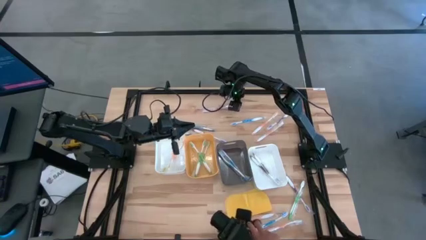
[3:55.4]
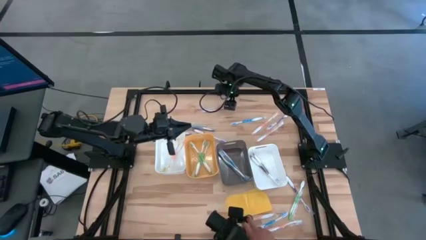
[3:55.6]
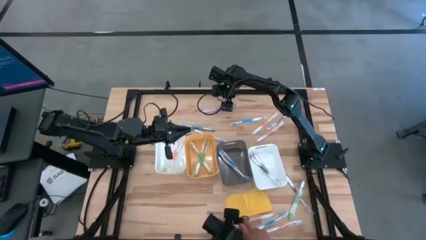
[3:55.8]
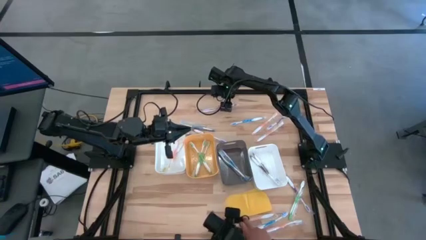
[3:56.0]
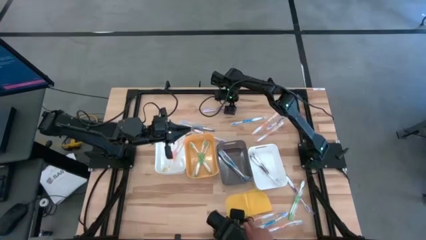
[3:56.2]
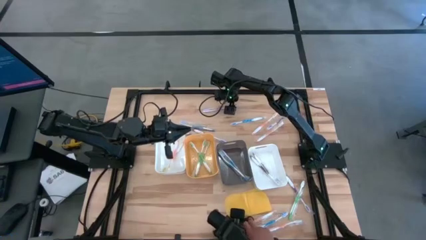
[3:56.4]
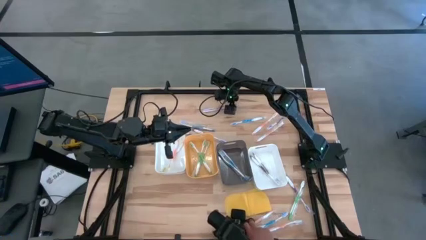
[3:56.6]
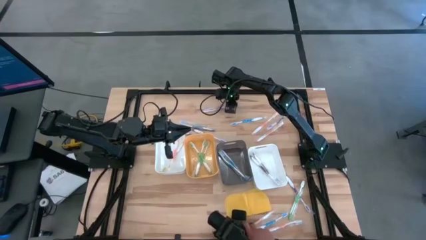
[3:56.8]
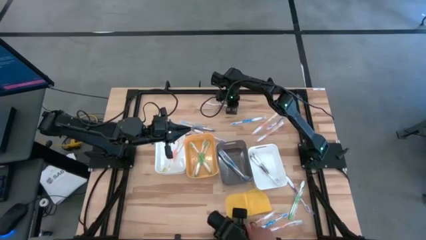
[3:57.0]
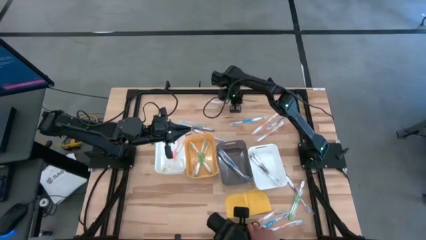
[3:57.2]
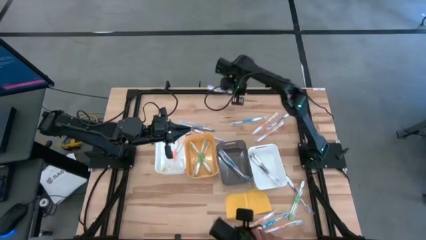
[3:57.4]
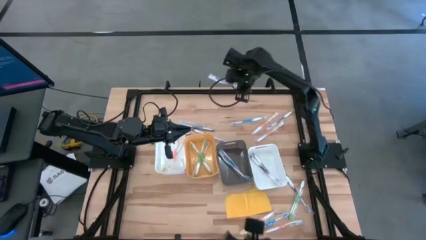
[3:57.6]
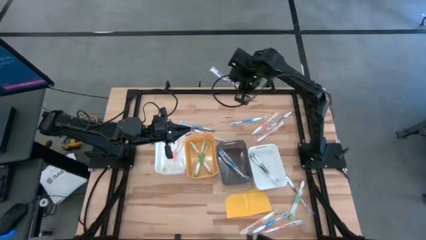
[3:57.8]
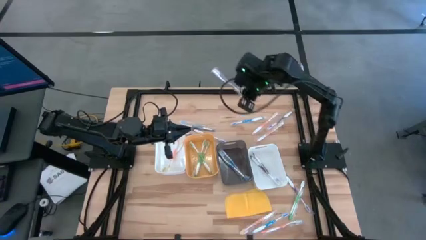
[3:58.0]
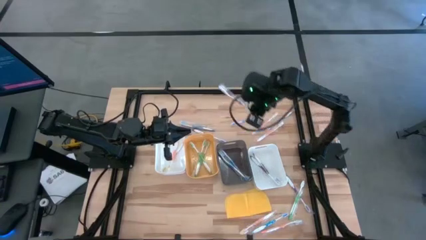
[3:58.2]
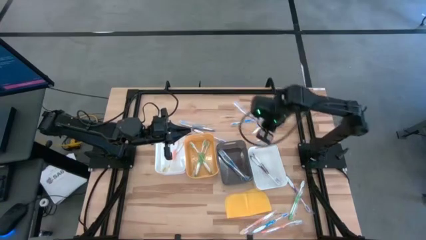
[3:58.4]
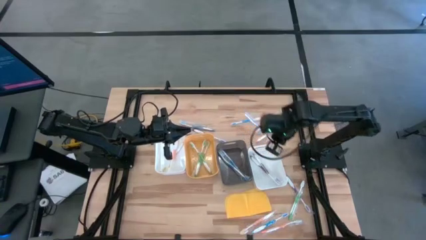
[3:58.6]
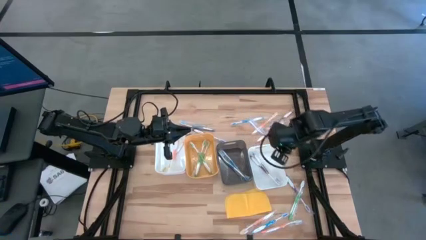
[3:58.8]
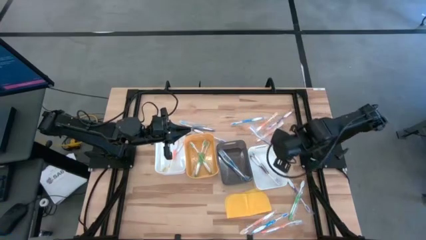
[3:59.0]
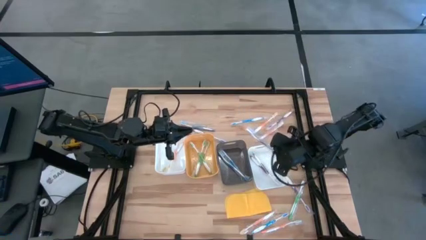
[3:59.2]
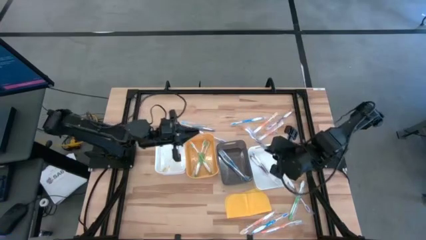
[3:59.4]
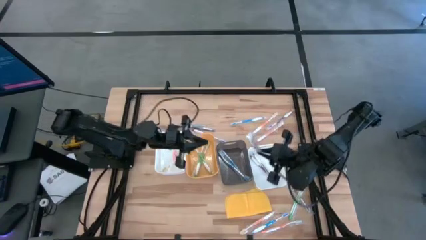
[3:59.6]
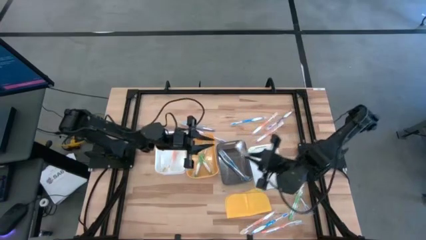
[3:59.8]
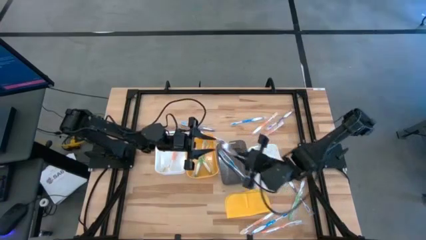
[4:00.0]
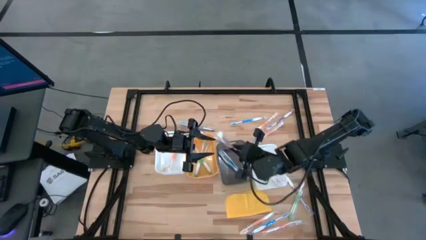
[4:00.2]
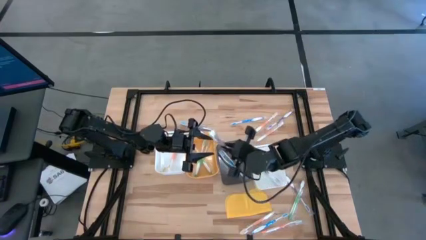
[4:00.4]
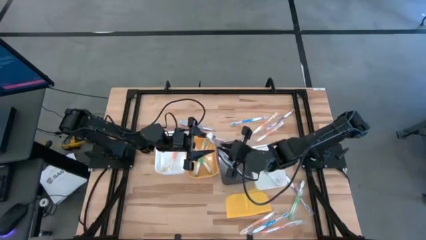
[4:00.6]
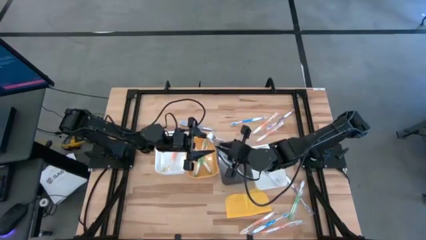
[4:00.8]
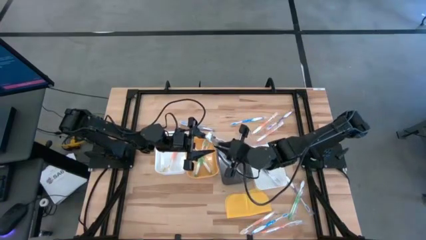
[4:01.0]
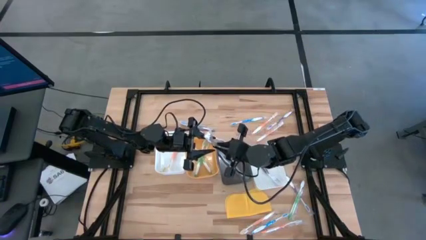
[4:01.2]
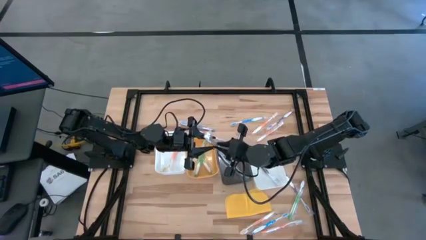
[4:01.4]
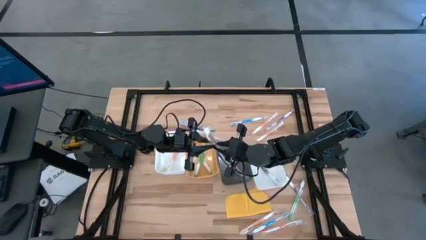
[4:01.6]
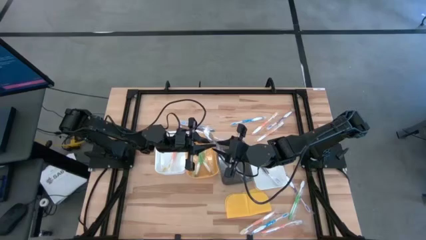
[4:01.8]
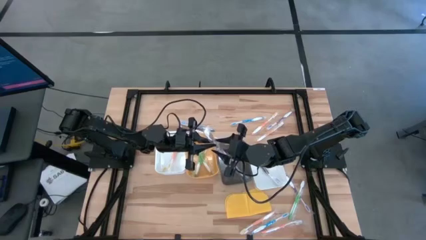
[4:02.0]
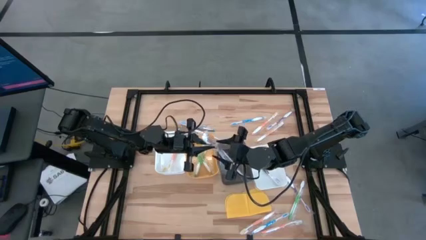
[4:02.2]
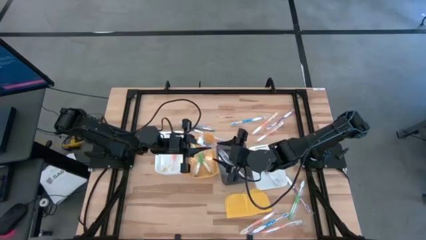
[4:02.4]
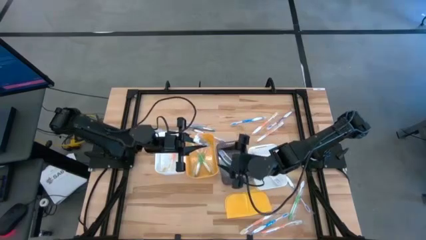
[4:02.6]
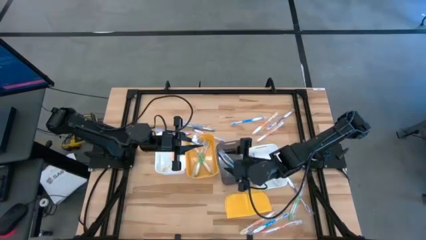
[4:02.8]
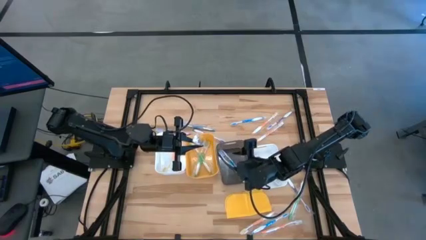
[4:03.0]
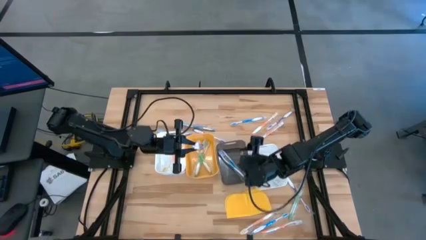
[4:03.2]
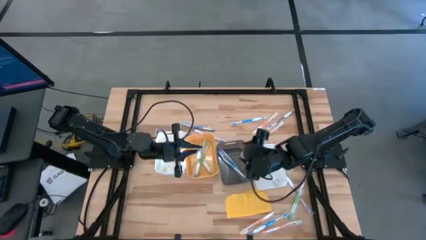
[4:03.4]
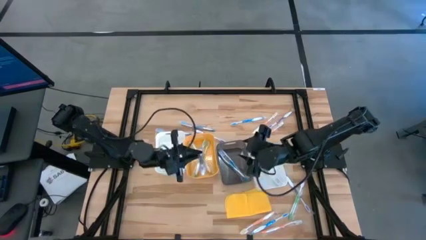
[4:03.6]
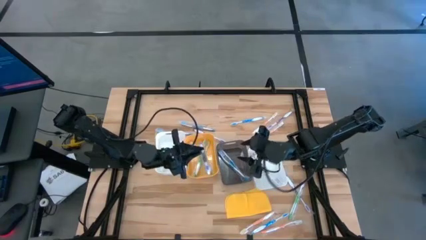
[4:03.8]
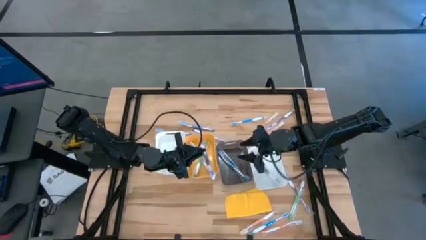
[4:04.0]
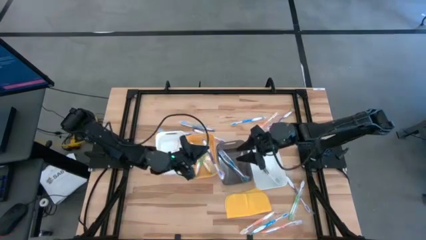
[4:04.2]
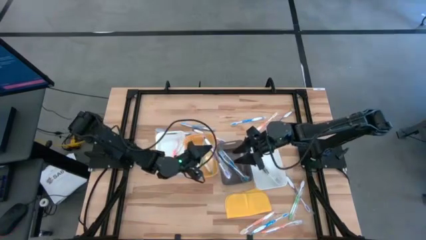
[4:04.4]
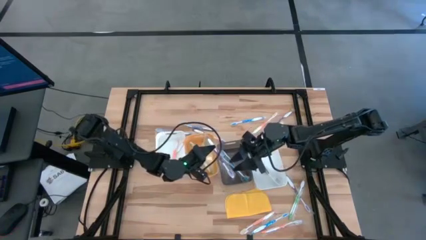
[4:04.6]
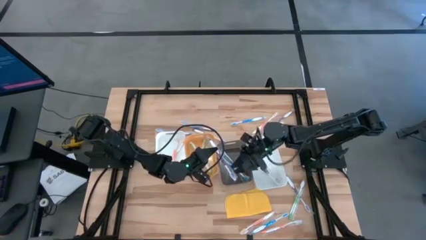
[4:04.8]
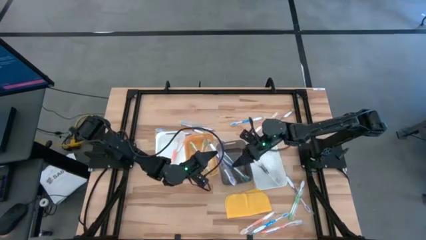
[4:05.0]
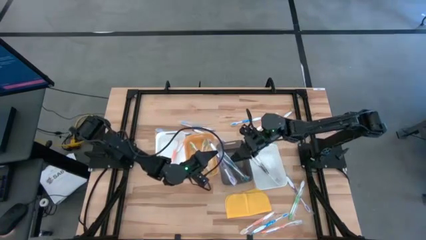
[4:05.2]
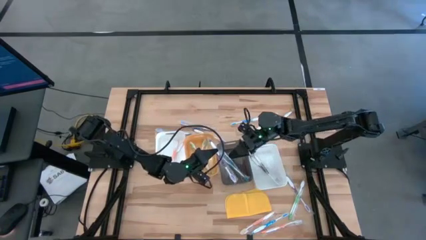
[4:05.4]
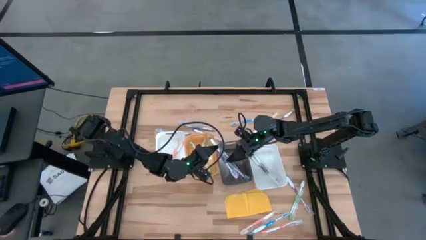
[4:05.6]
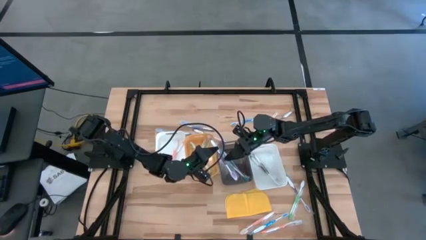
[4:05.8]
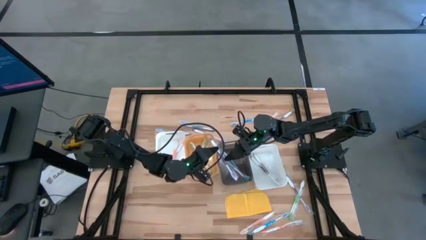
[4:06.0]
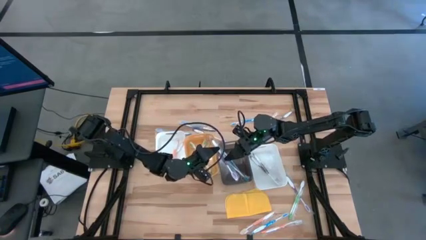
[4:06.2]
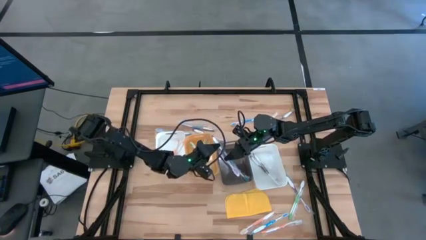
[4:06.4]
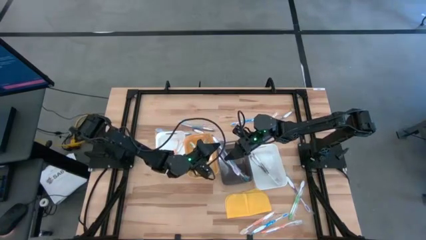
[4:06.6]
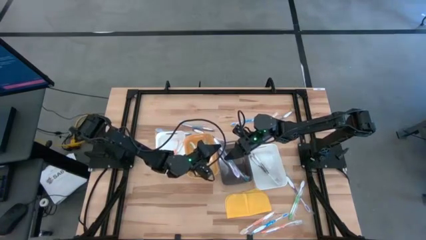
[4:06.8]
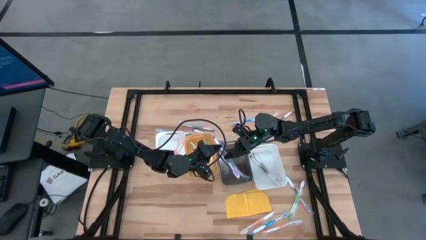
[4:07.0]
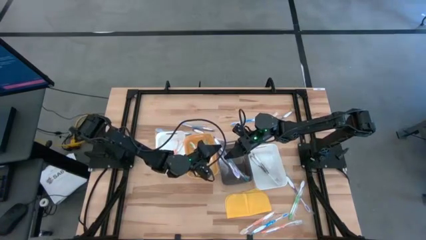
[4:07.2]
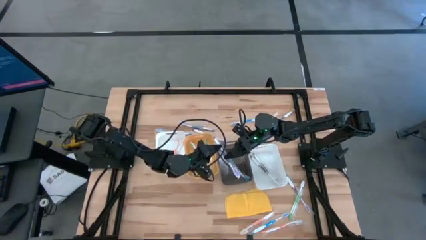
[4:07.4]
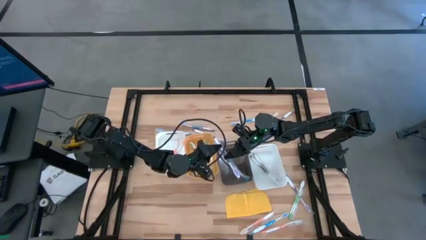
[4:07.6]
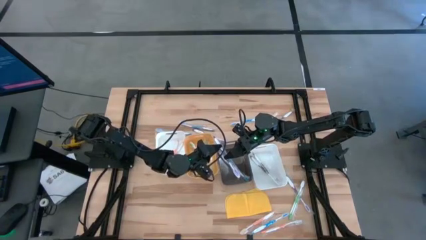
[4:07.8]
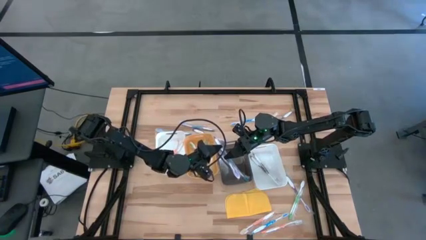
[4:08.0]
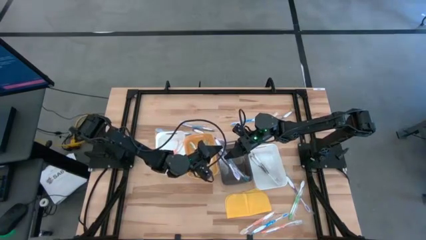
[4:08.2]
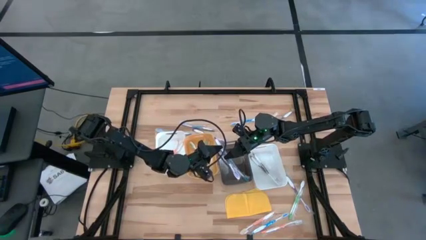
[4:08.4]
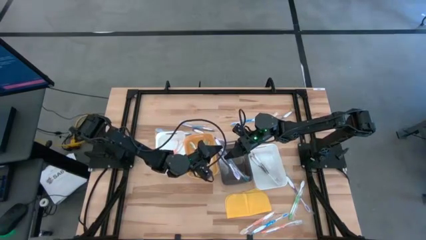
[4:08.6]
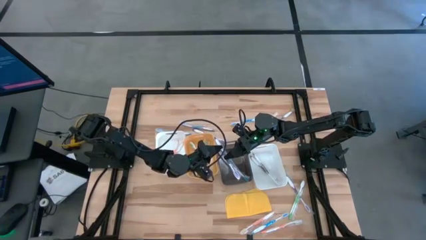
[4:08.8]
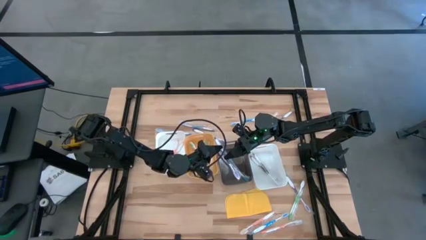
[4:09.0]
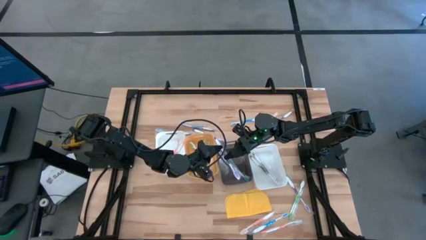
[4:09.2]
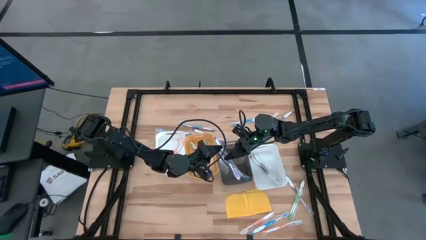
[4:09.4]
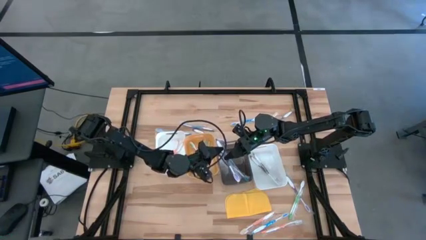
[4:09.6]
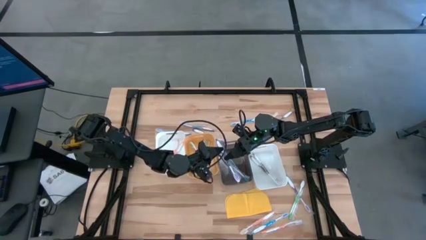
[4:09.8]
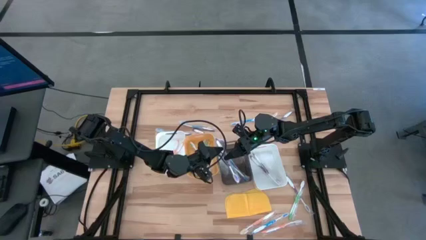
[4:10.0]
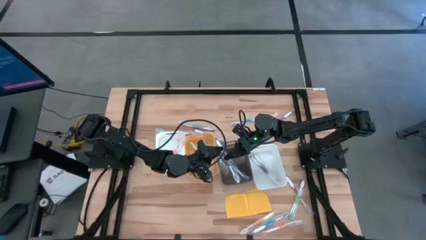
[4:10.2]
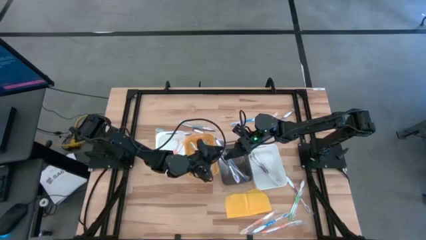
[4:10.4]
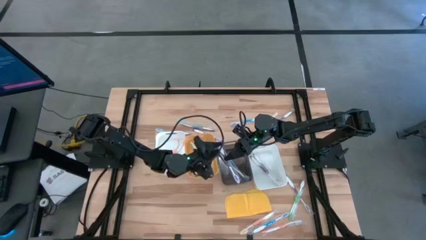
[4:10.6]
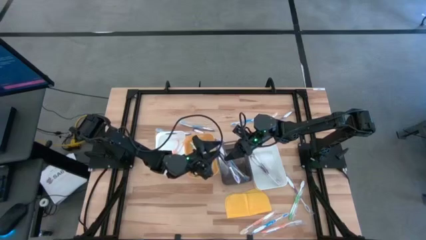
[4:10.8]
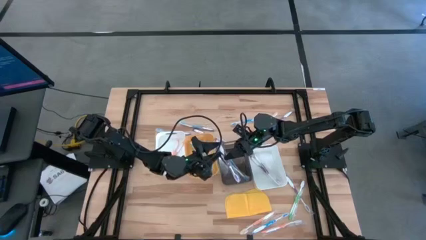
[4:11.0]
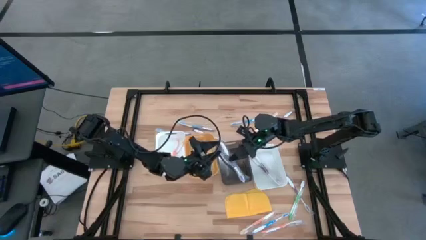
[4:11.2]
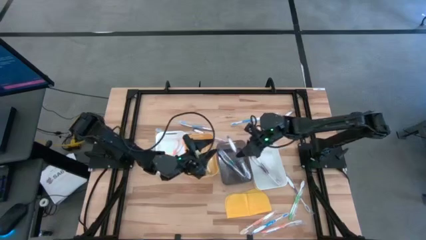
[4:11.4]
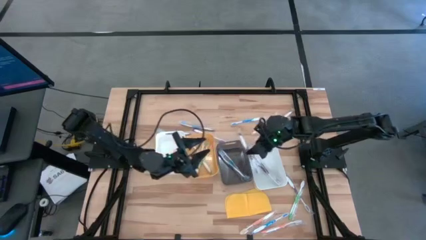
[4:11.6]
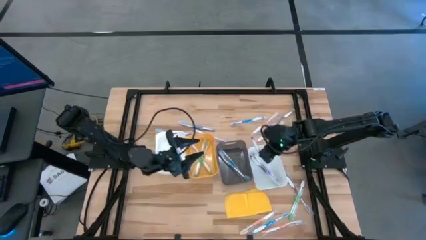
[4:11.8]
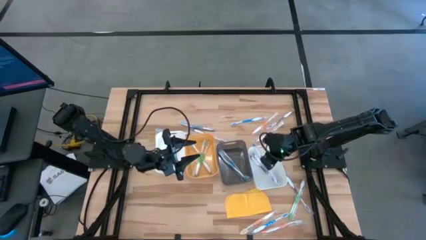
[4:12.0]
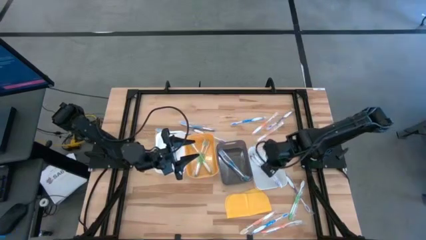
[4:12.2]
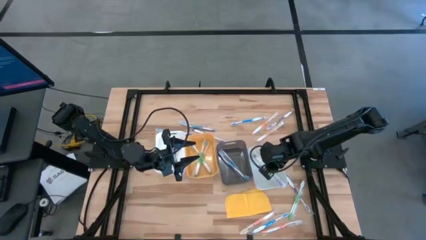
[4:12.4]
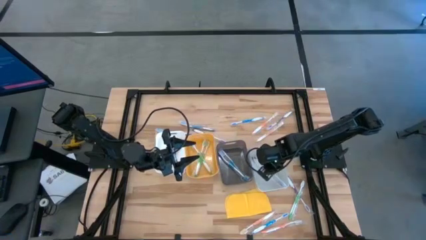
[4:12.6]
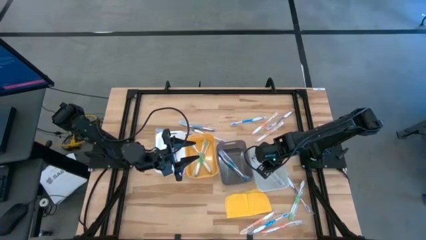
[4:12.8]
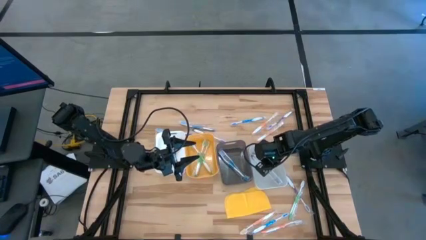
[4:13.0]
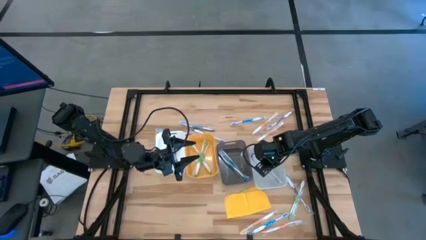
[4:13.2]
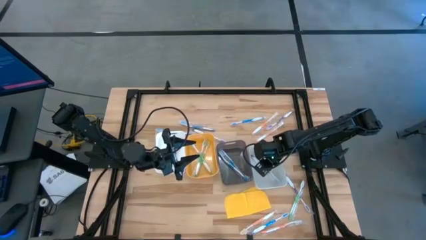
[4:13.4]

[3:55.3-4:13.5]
Task: Pick & Place Toothbrushes
Put the purple toothbrush into the right white bin
